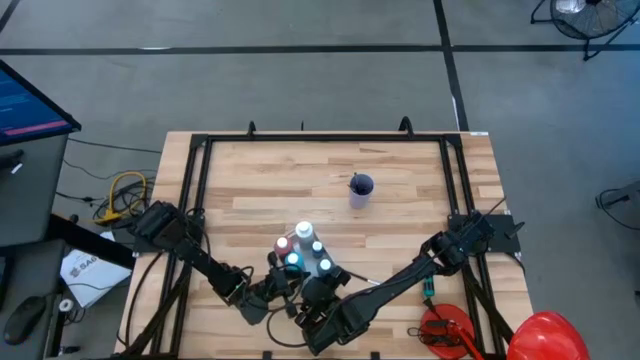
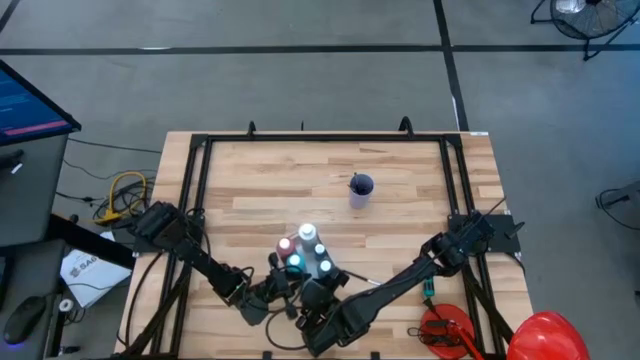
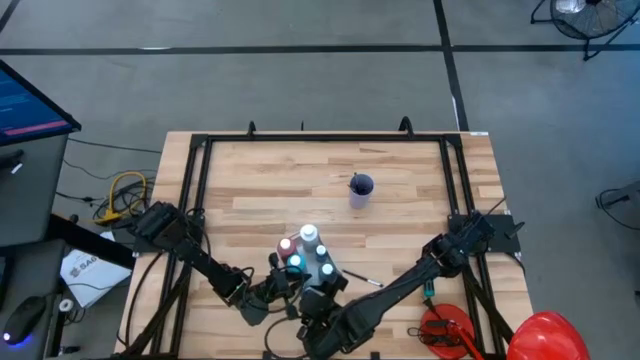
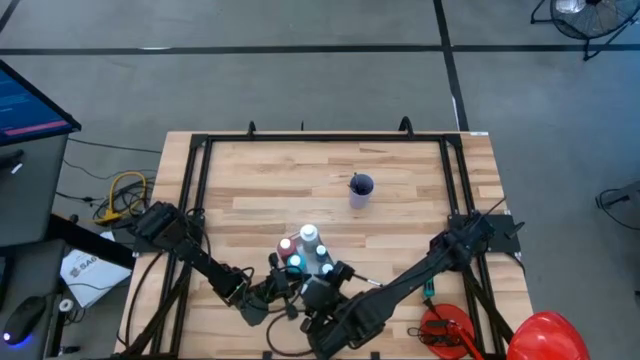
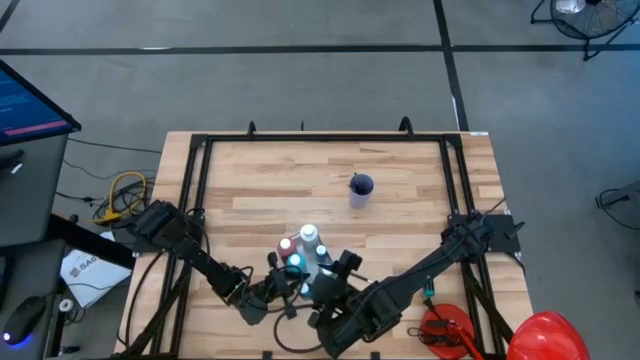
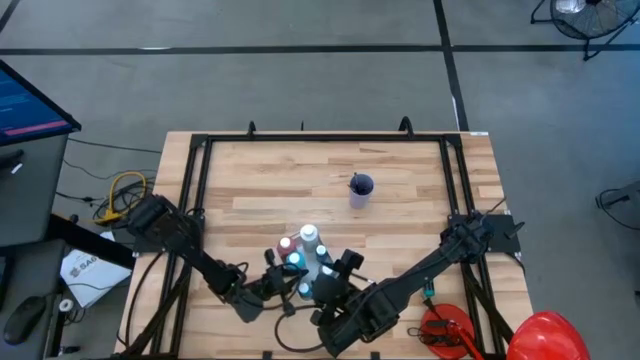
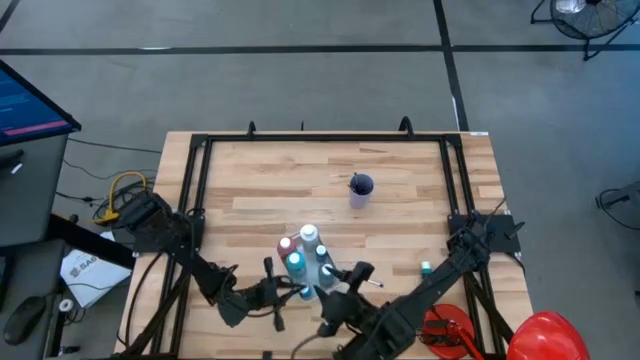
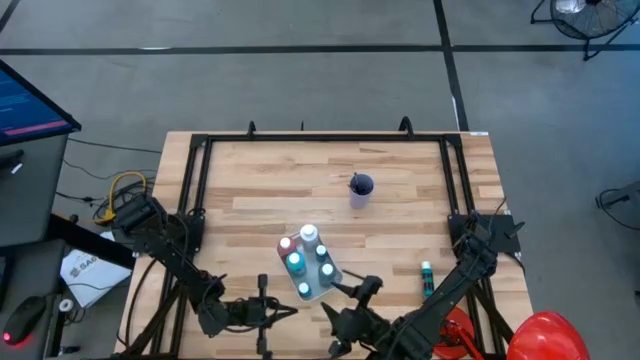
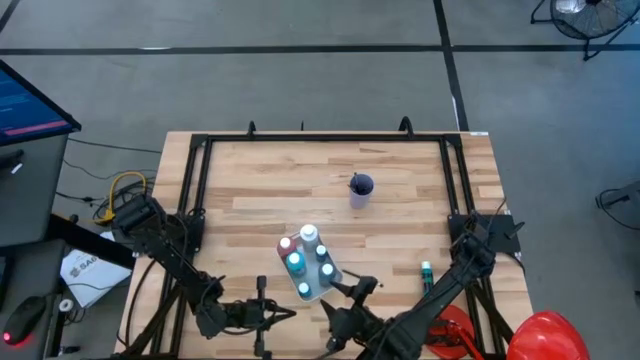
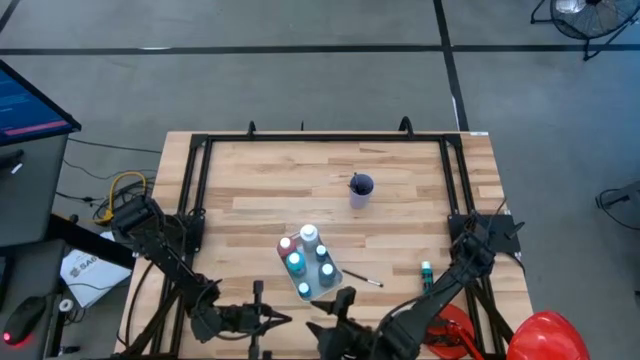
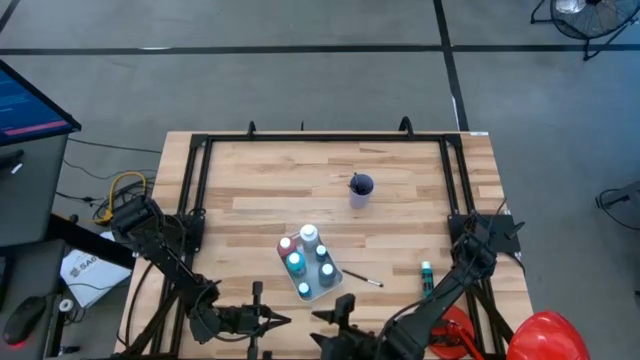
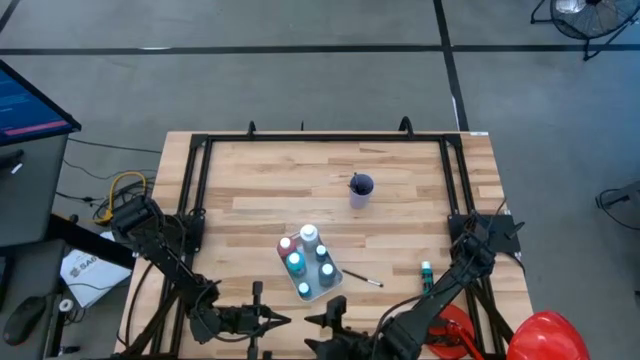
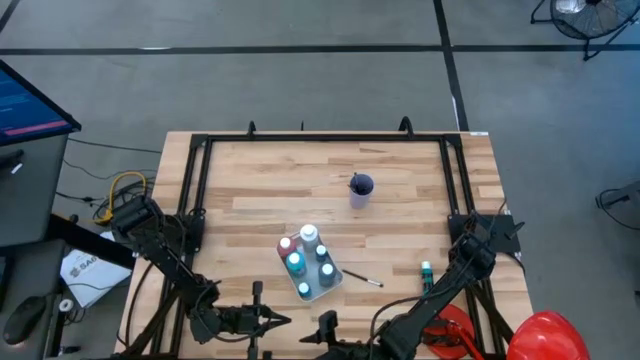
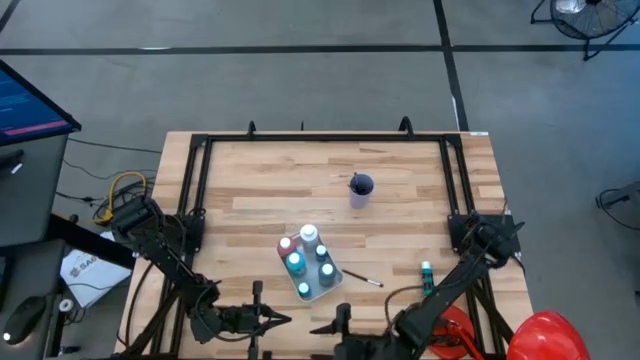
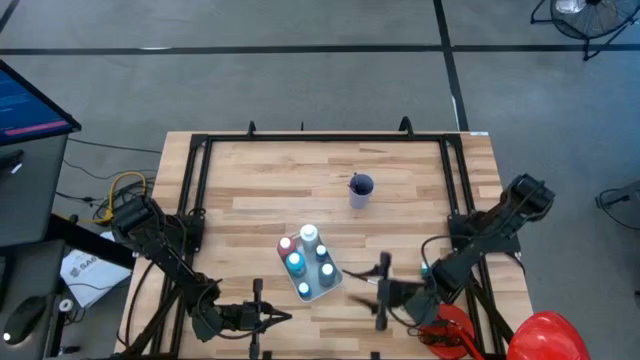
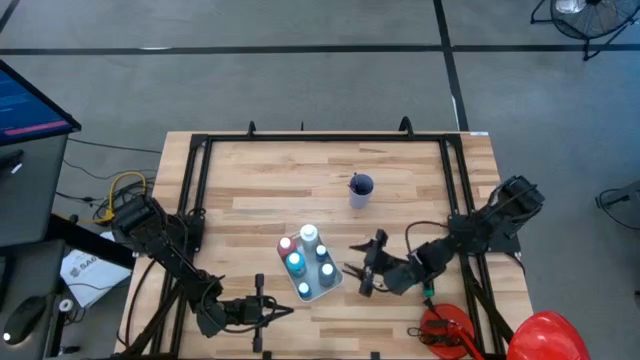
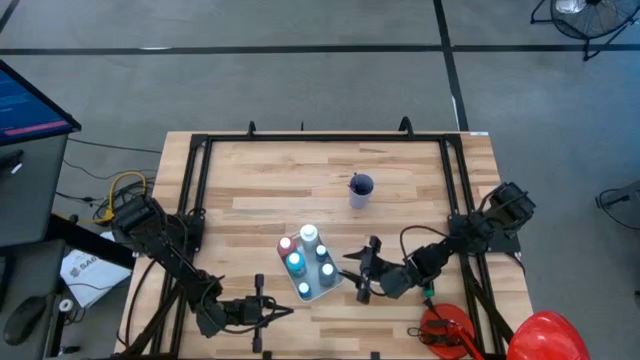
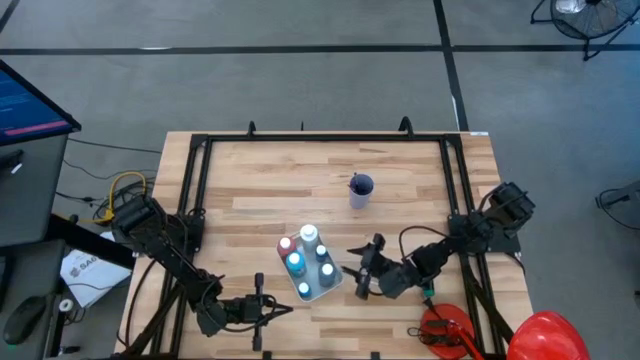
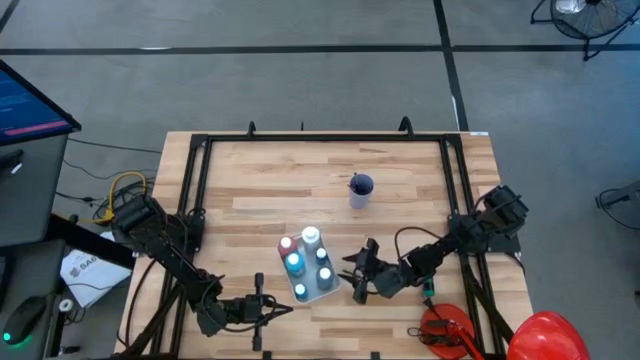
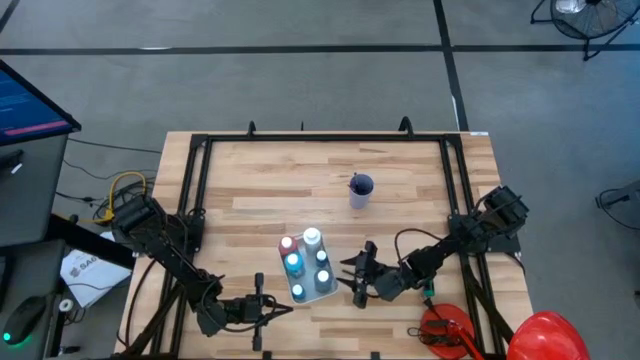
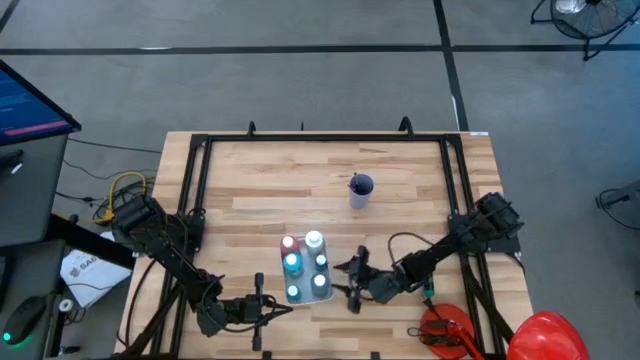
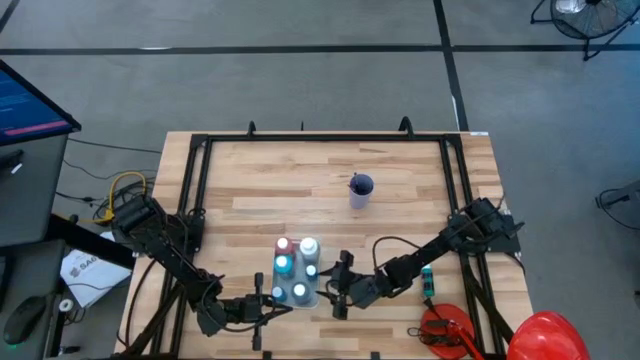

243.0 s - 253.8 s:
Task: Pick & Place Paint Supplies
Adjust the white bin on the table

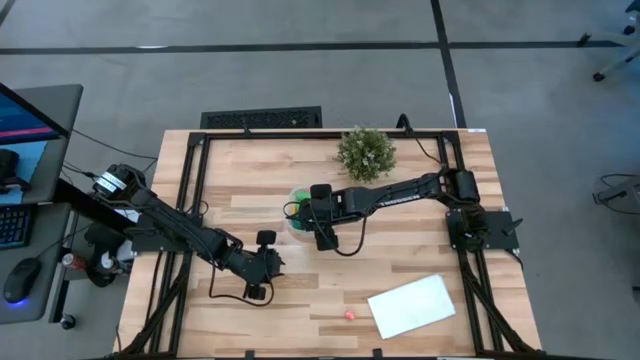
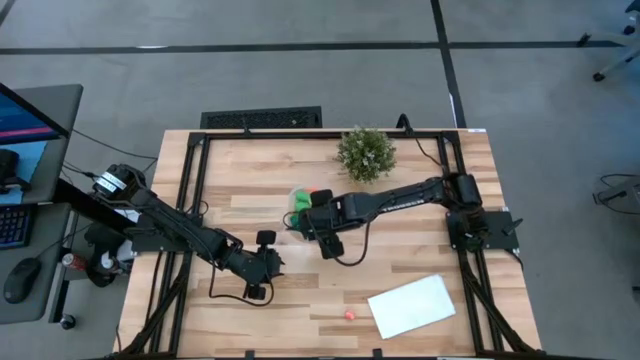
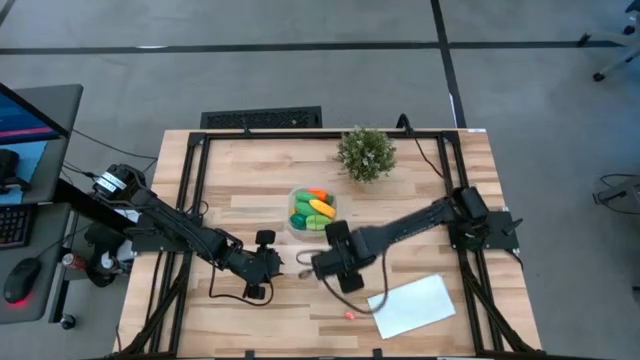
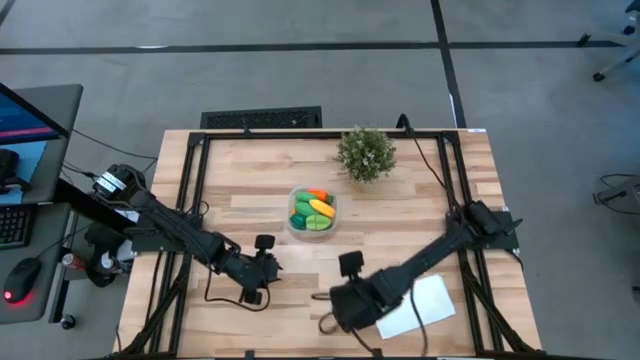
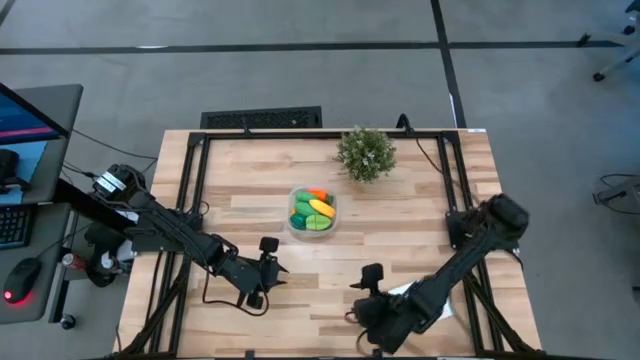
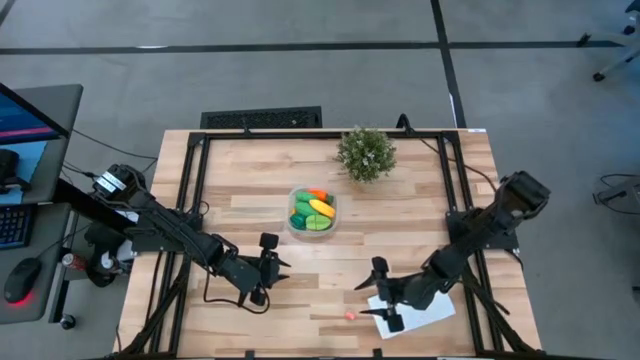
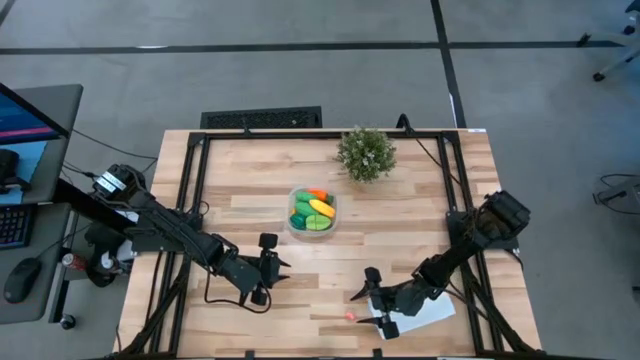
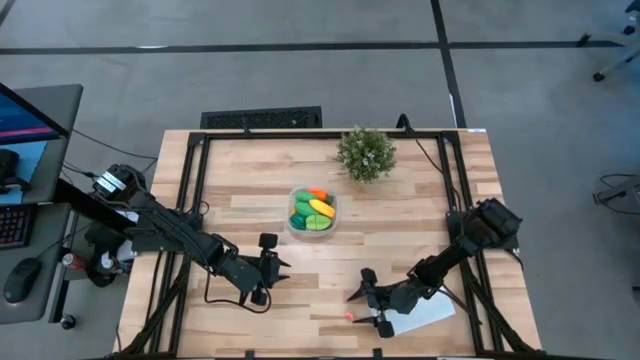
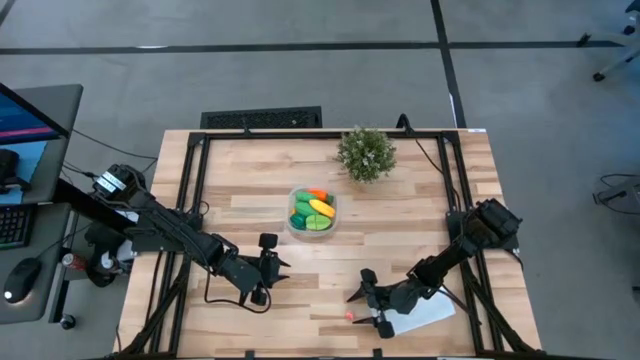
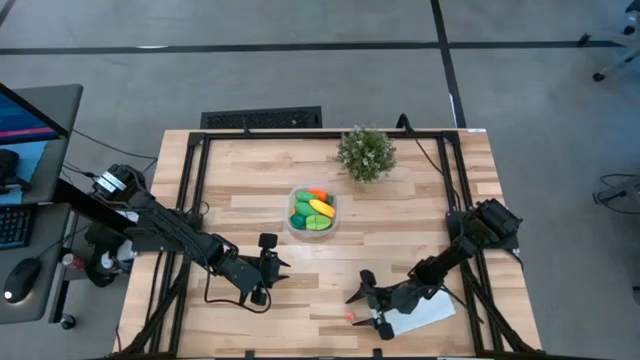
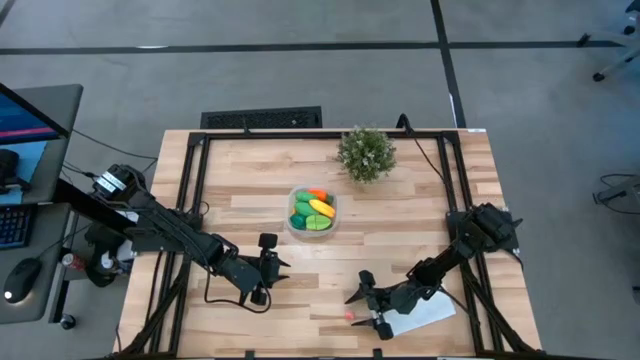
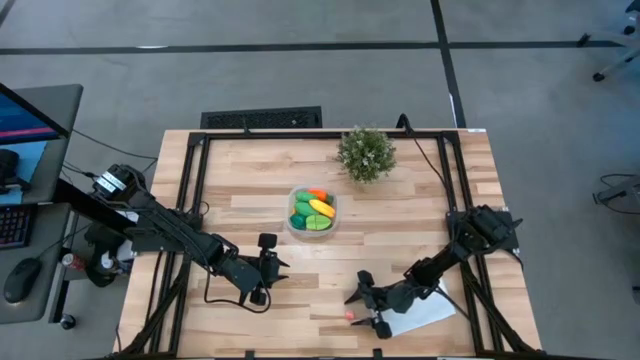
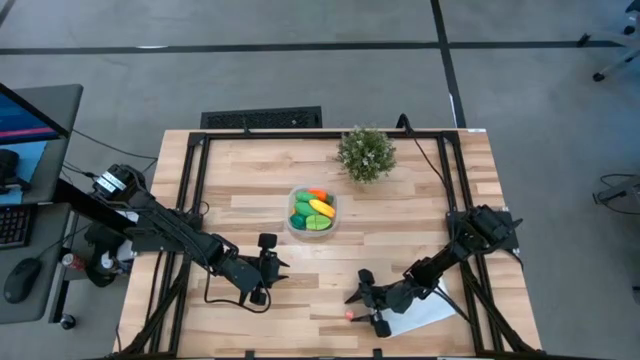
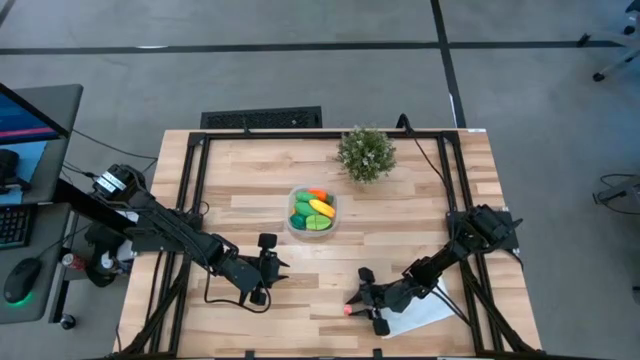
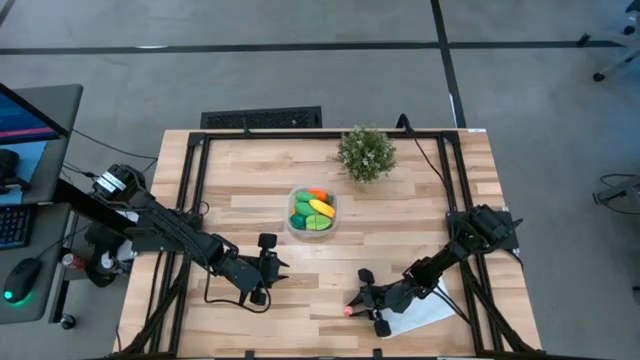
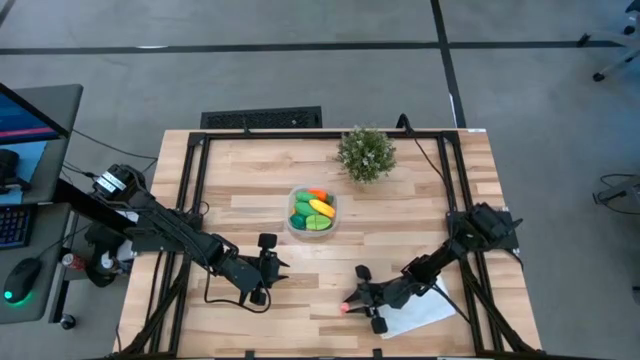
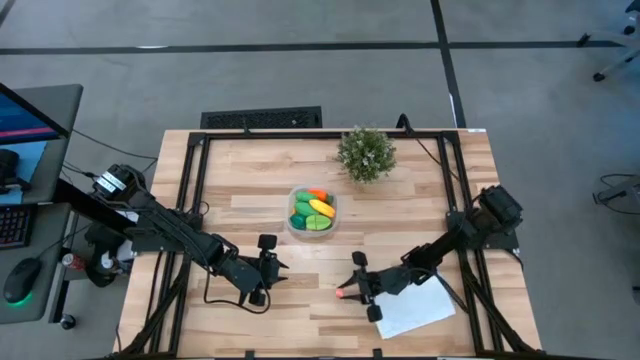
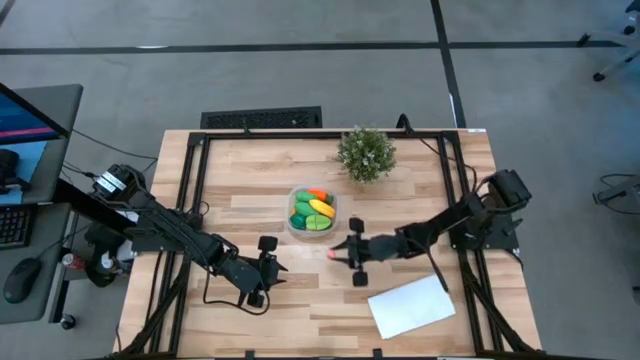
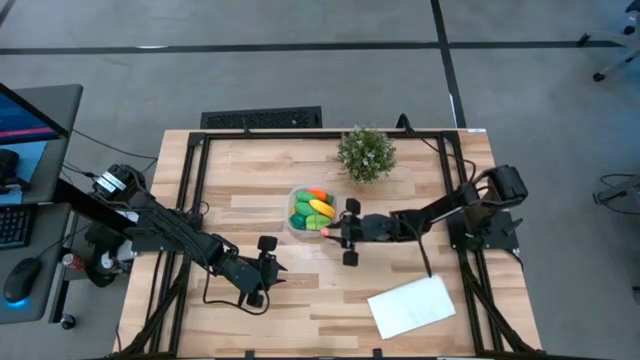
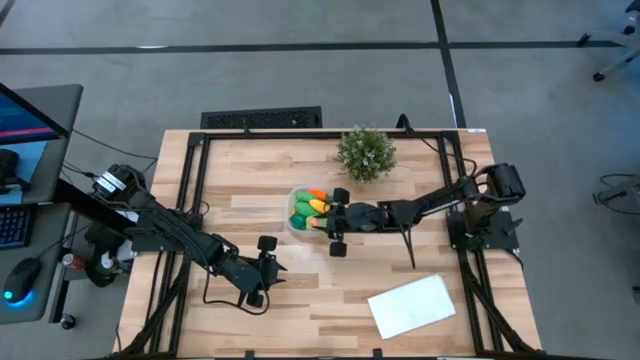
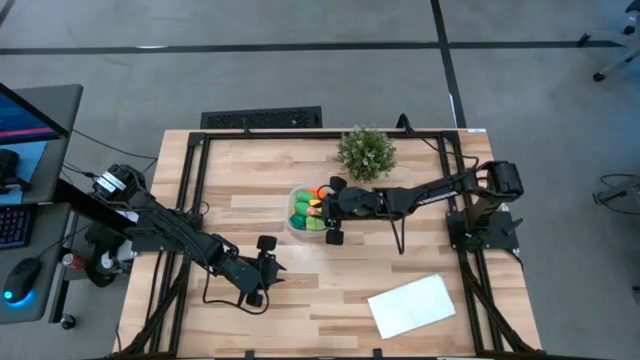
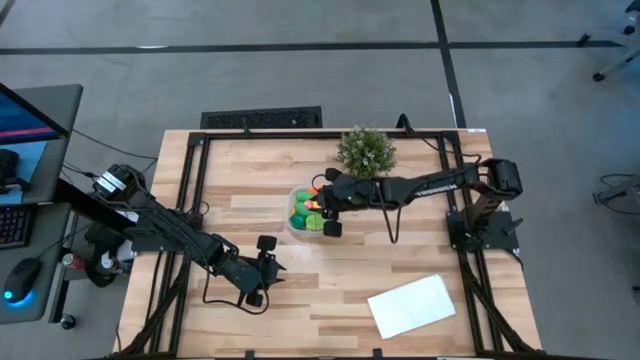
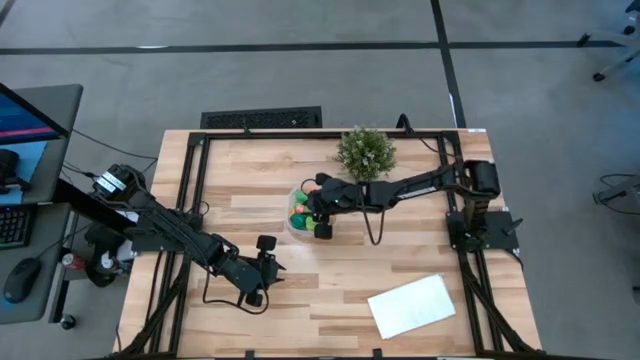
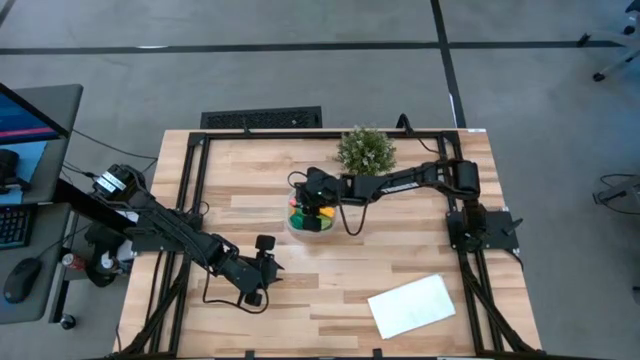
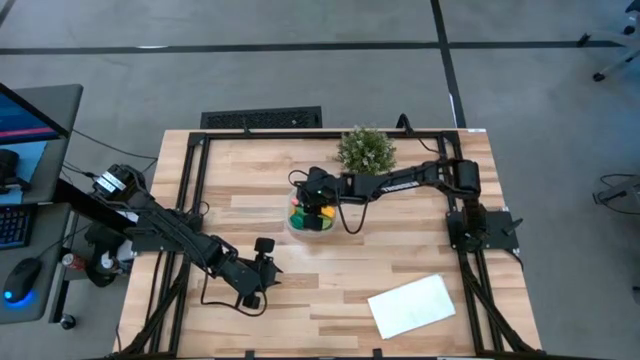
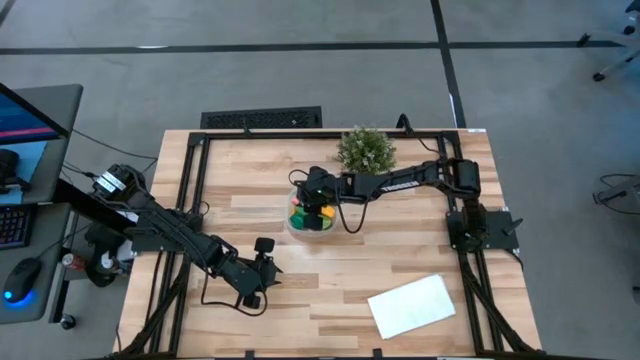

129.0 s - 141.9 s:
Task: Pick and placing Produce into tupperware
Put the pink peach into the transparent container
